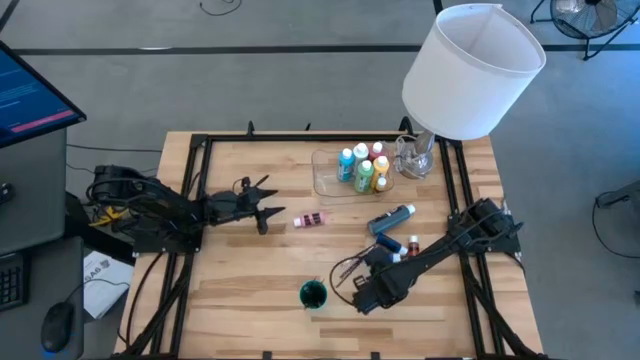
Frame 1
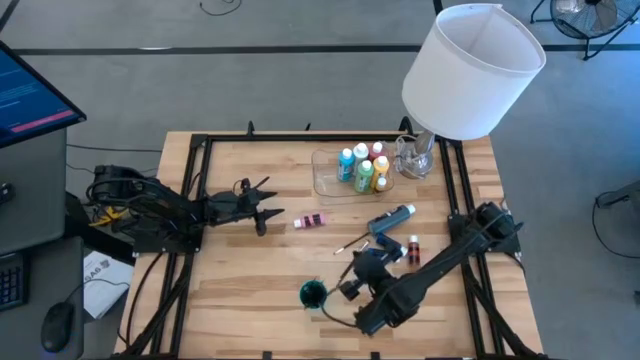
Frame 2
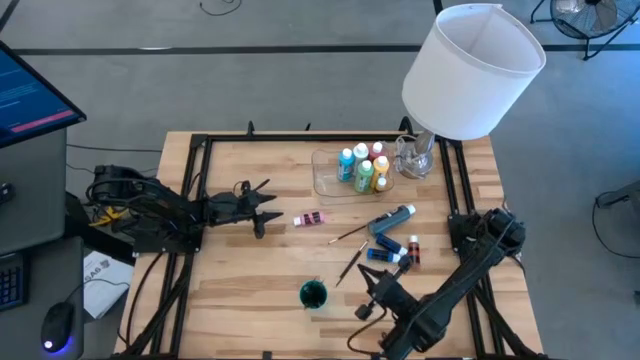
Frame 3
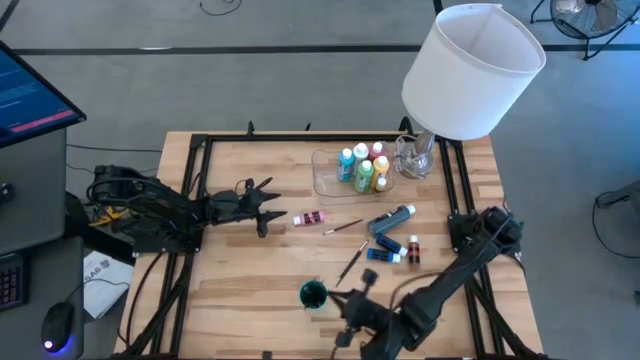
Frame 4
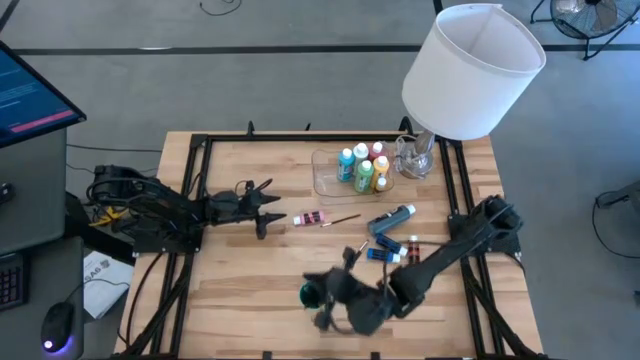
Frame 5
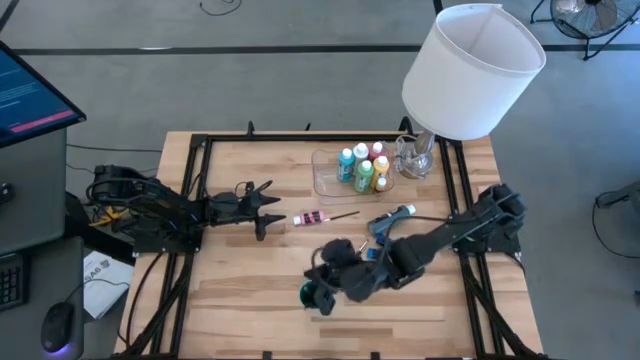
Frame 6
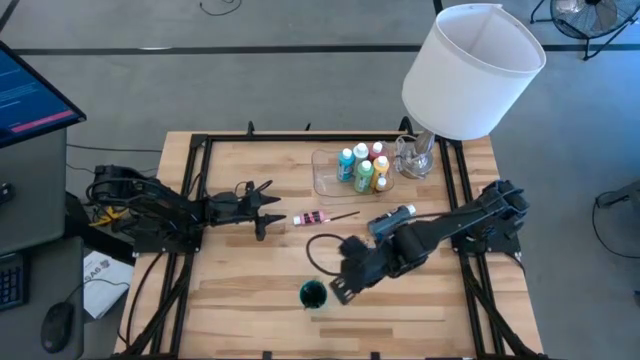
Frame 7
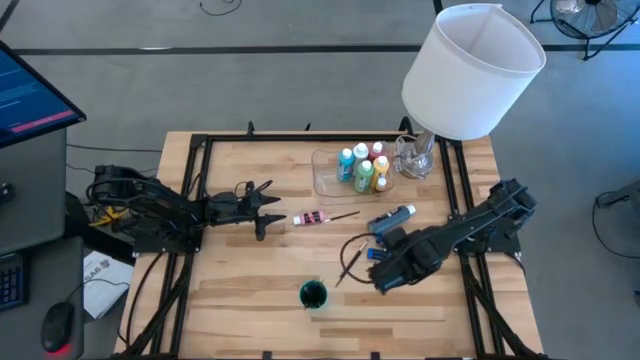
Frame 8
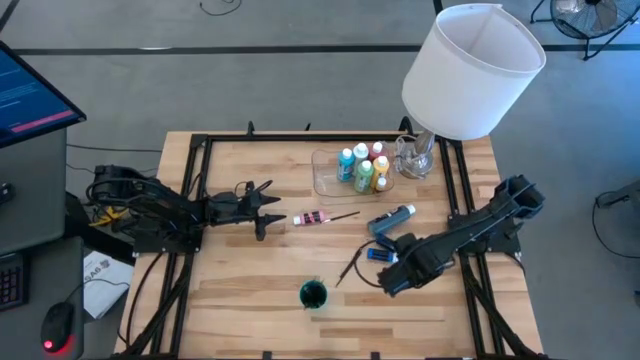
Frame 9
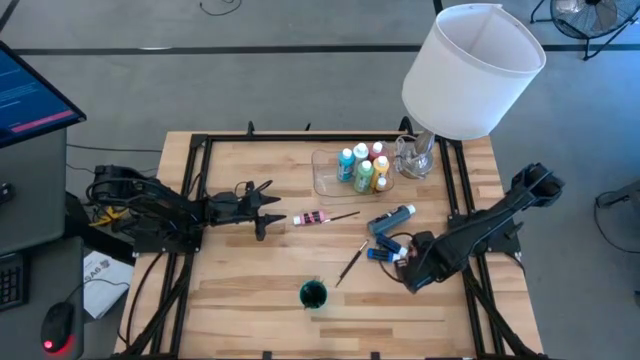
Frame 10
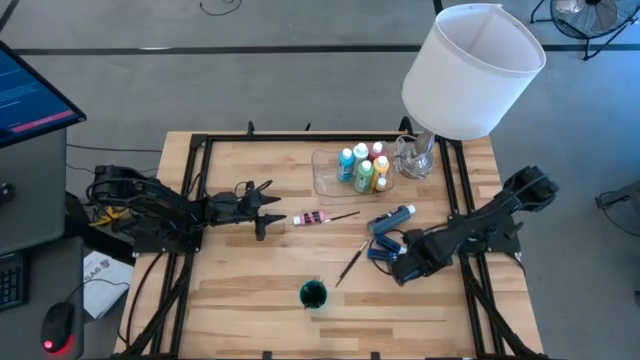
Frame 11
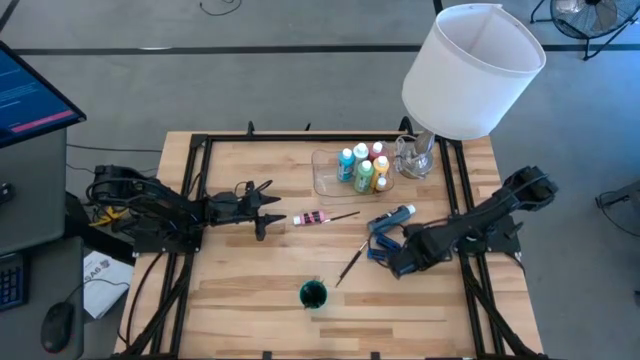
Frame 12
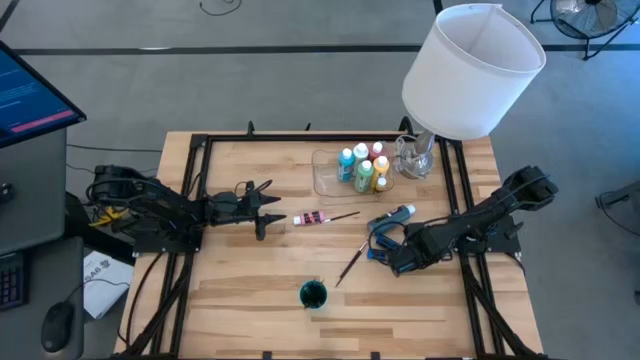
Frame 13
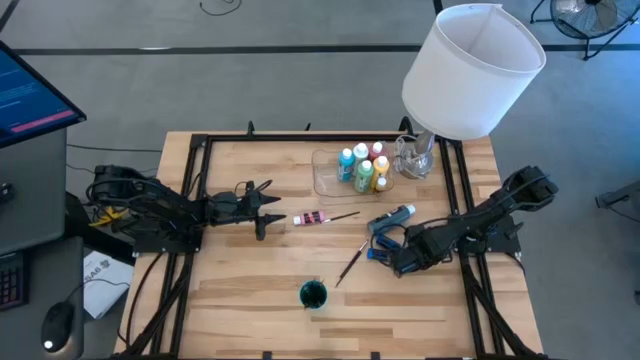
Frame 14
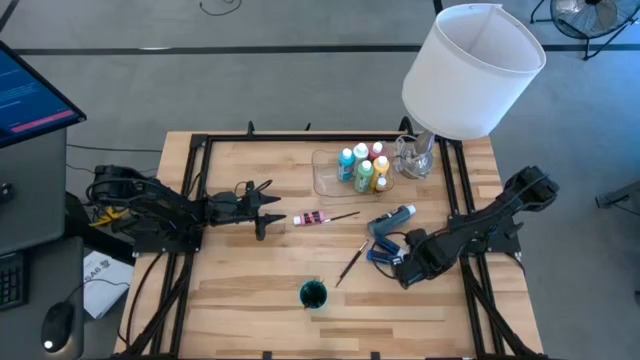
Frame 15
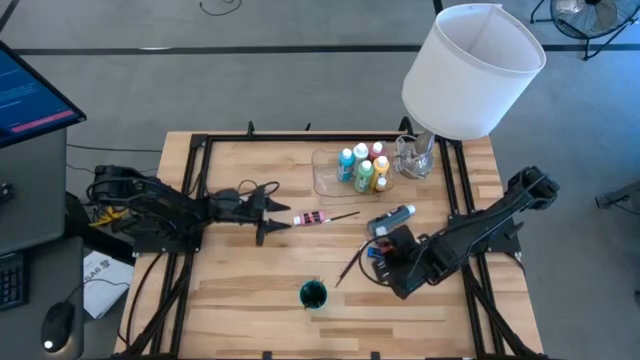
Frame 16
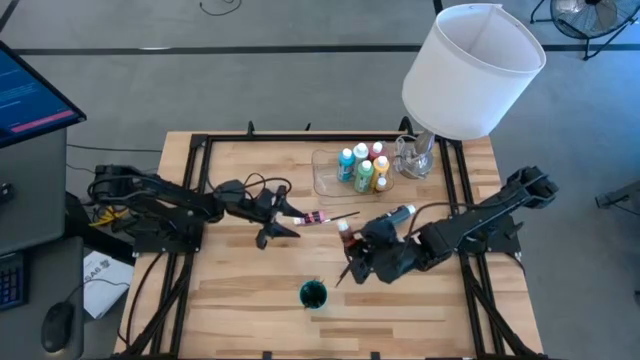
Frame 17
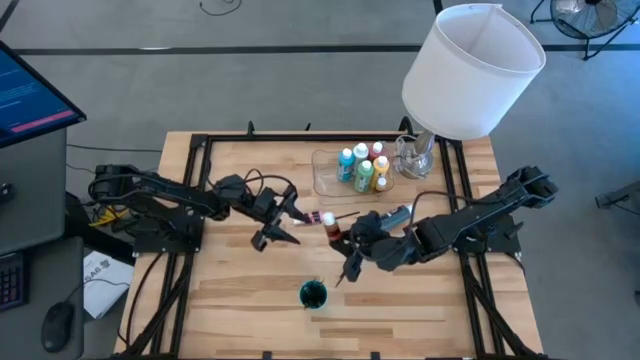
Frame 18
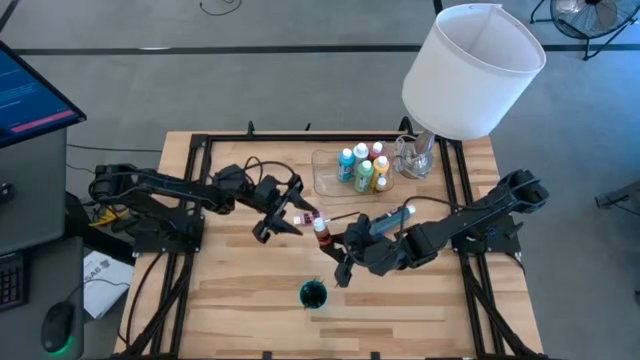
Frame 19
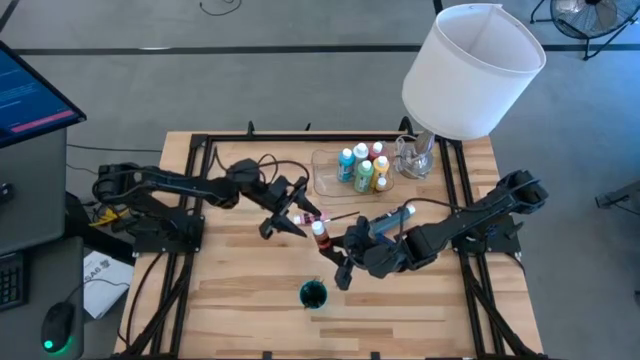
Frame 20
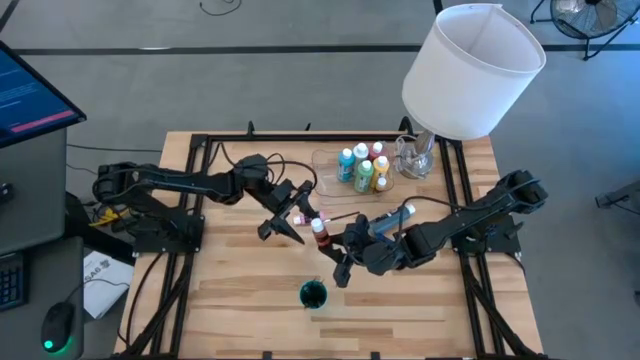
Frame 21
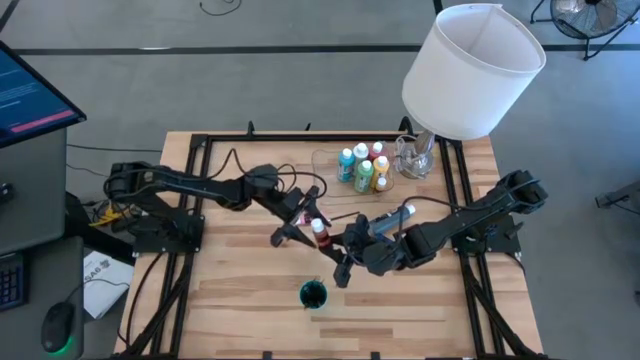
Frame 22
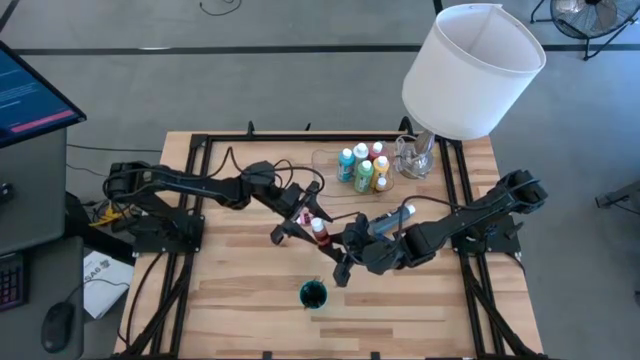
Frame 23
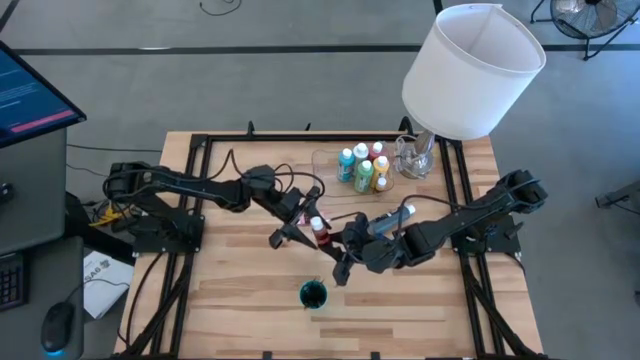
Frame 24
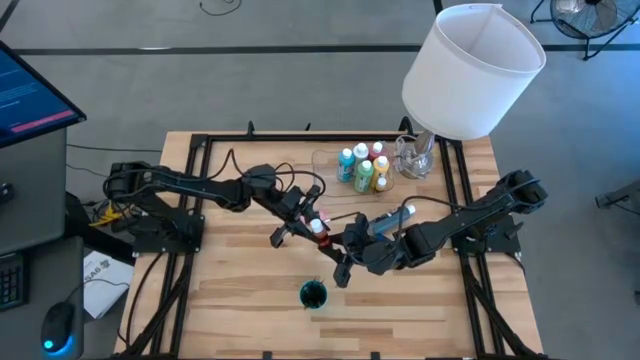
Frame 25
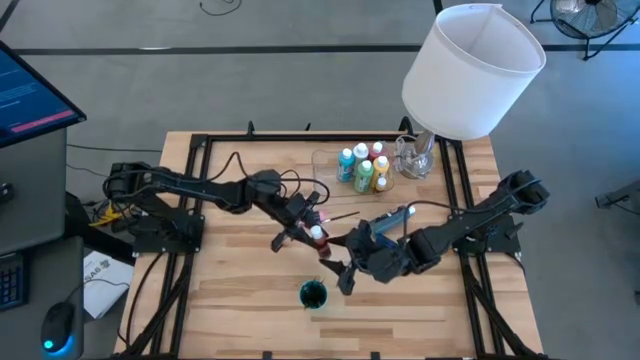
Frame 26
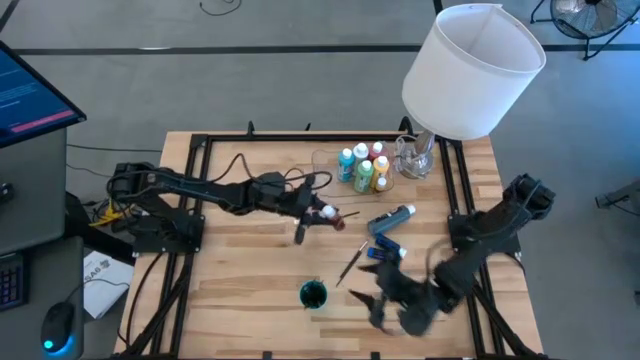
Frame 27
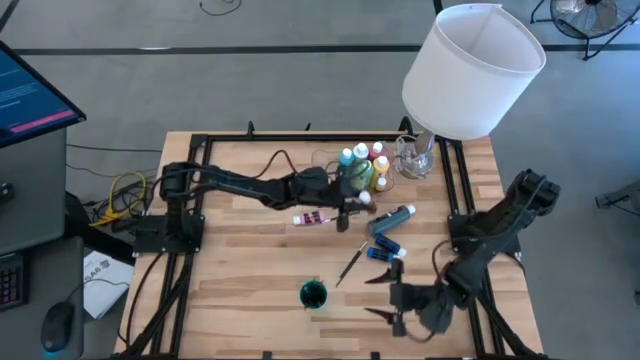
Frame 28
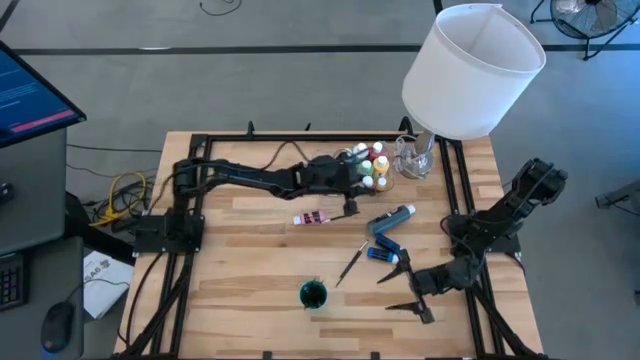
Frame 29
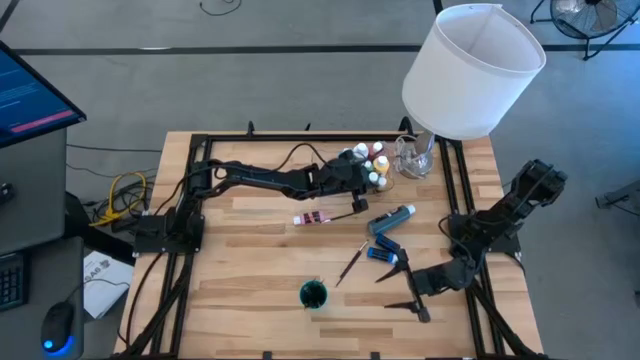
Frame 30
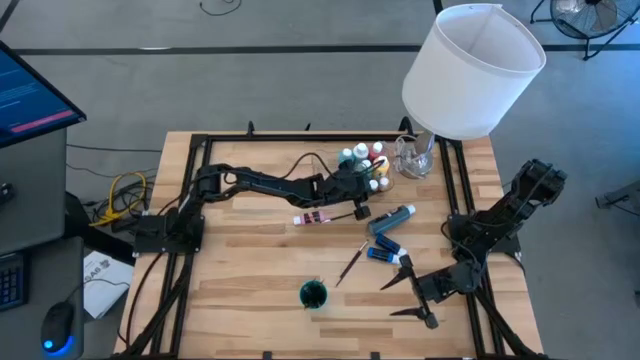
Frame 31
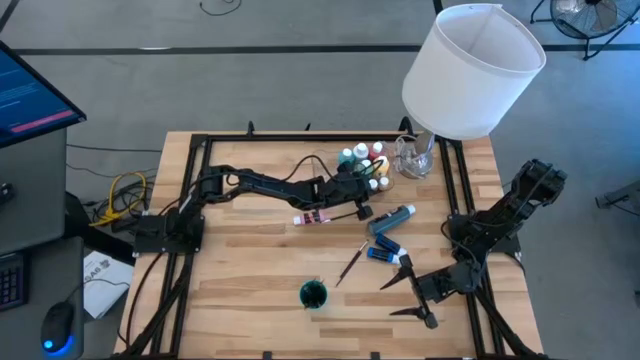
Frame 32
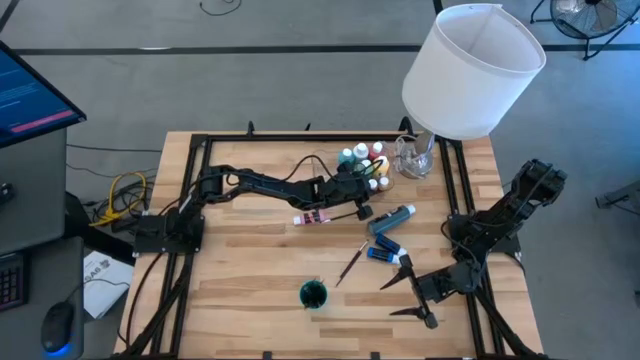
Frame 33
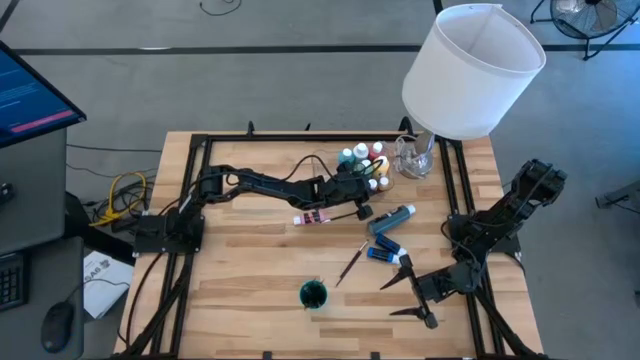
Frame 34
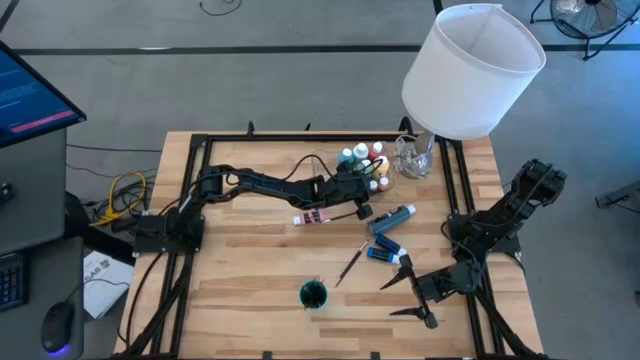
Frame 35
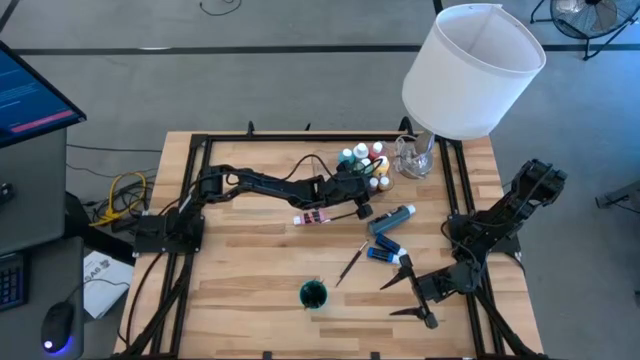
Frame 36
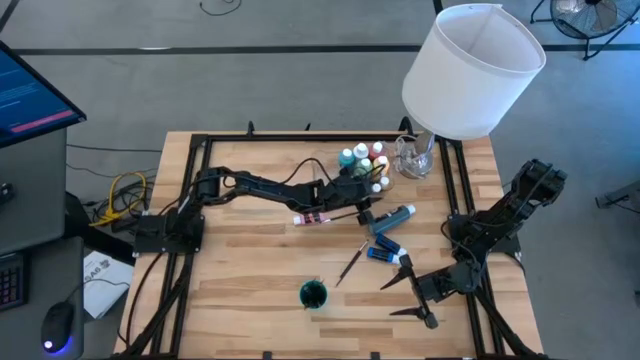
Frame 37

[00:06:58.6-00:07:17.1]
Task: Pick & Place Paint Supplies
Put the small orange paint bottle into the transparent bin
